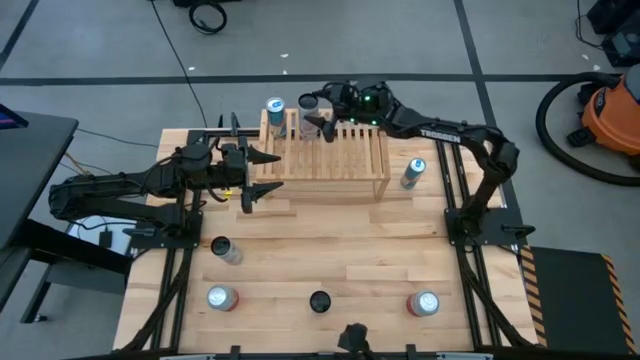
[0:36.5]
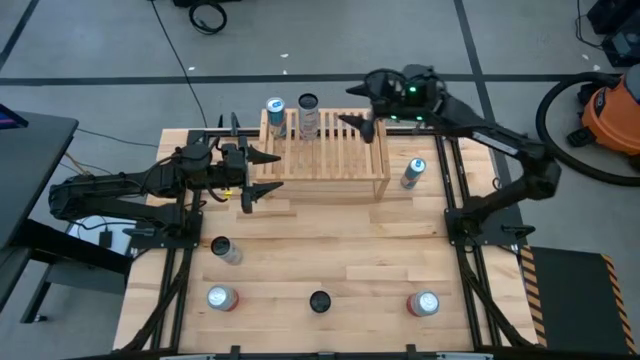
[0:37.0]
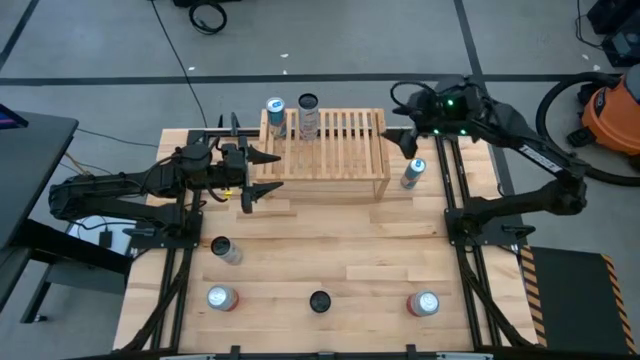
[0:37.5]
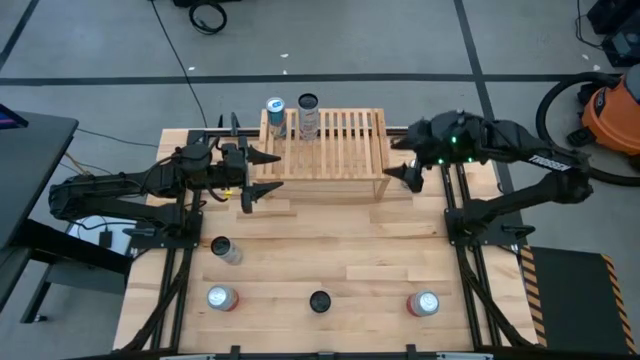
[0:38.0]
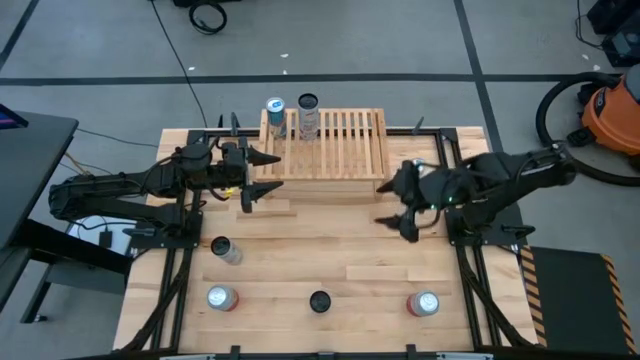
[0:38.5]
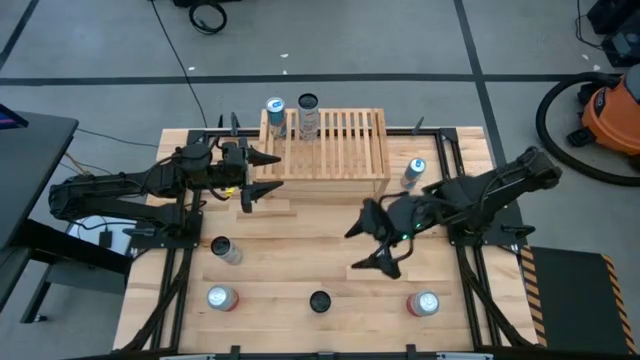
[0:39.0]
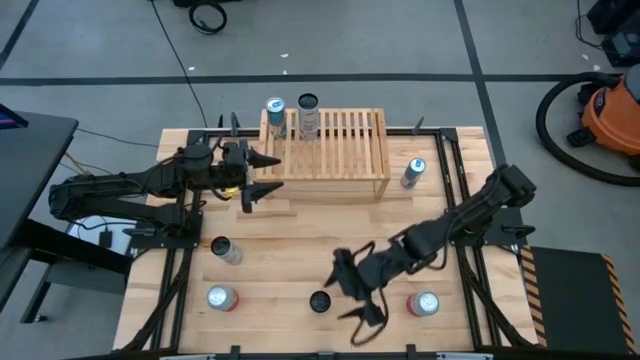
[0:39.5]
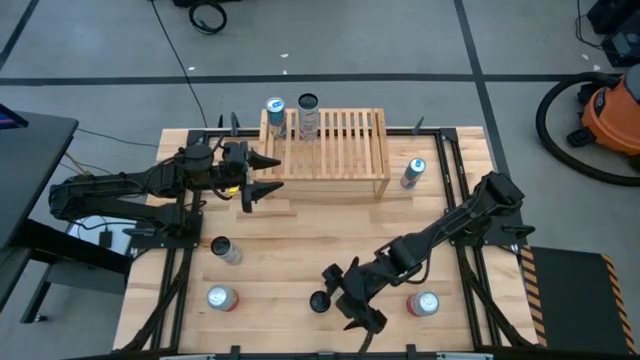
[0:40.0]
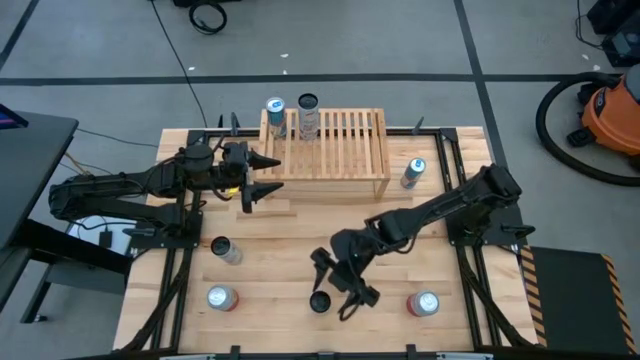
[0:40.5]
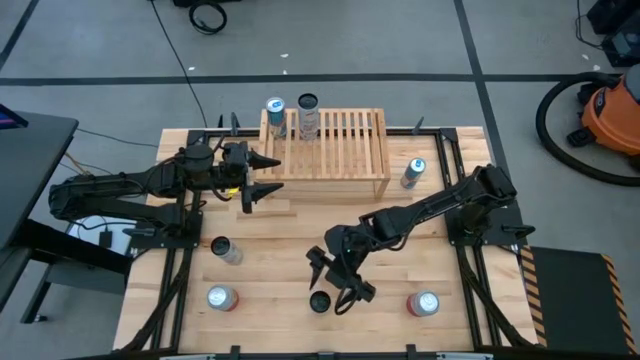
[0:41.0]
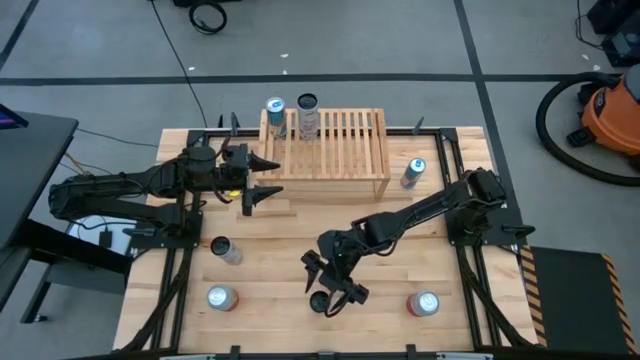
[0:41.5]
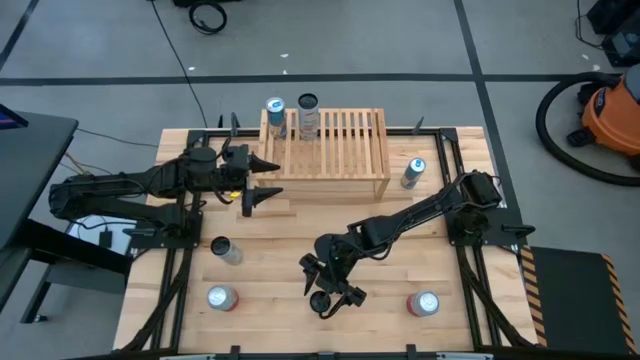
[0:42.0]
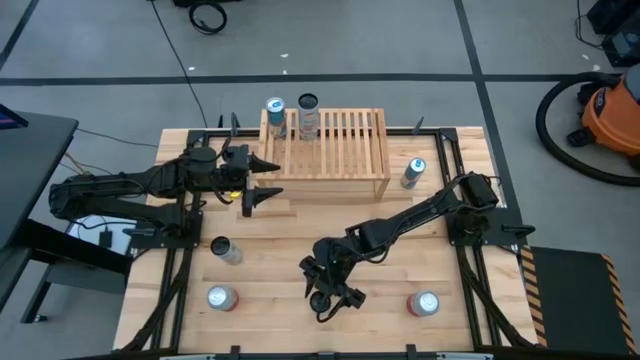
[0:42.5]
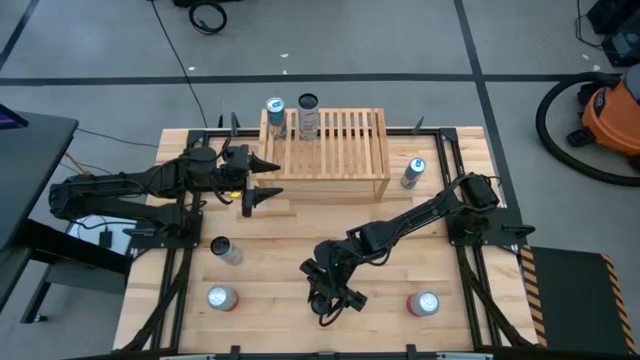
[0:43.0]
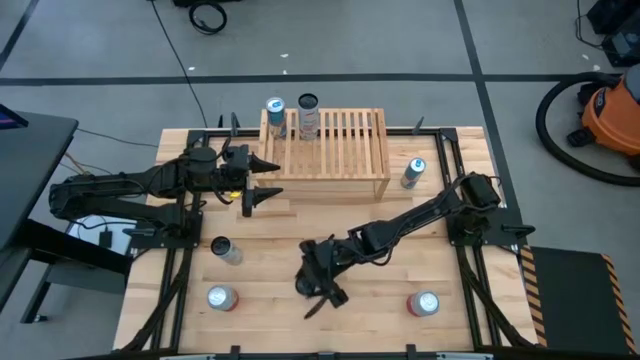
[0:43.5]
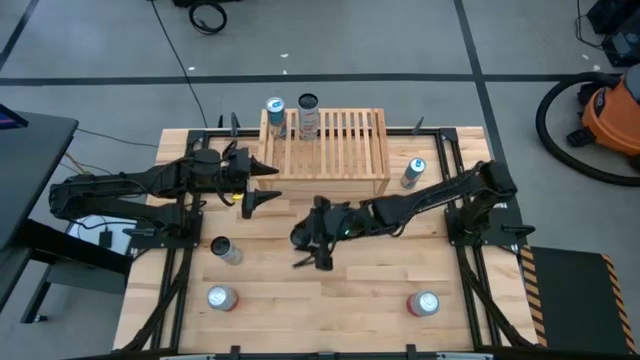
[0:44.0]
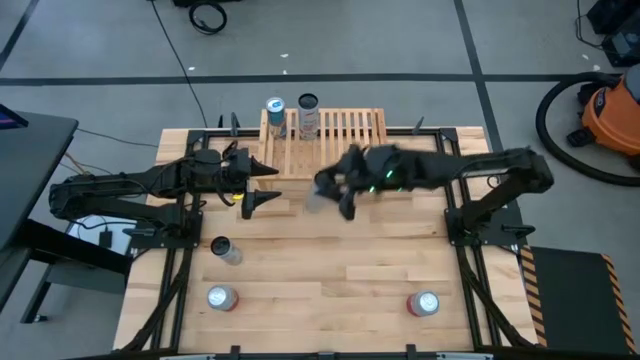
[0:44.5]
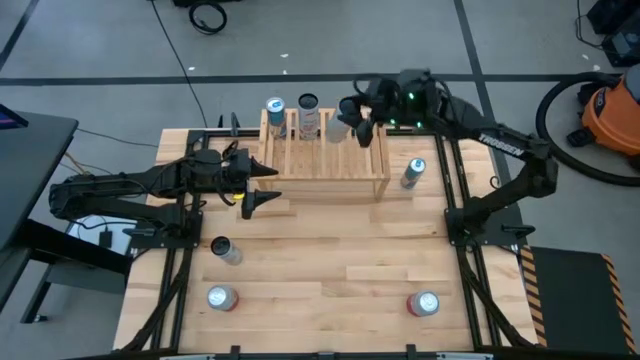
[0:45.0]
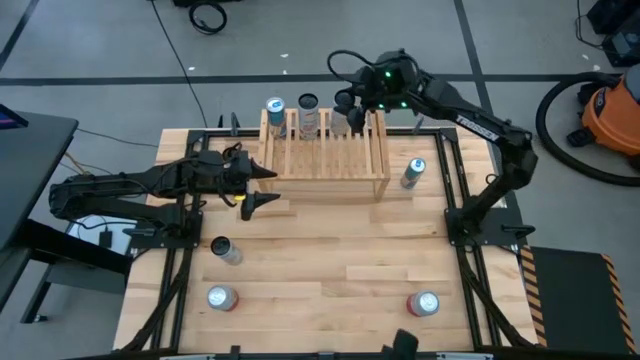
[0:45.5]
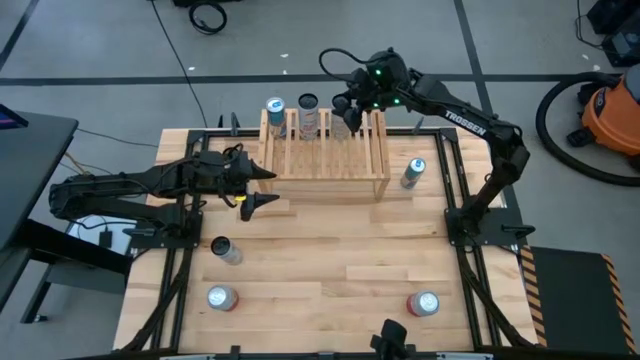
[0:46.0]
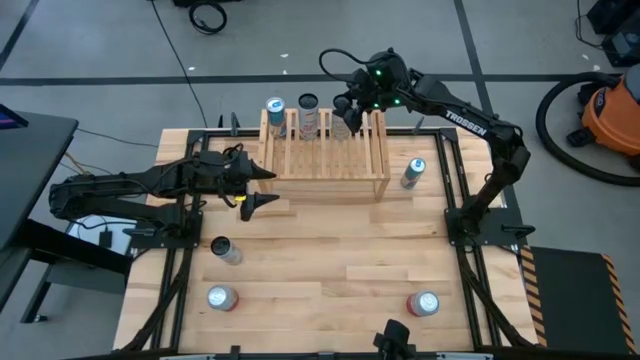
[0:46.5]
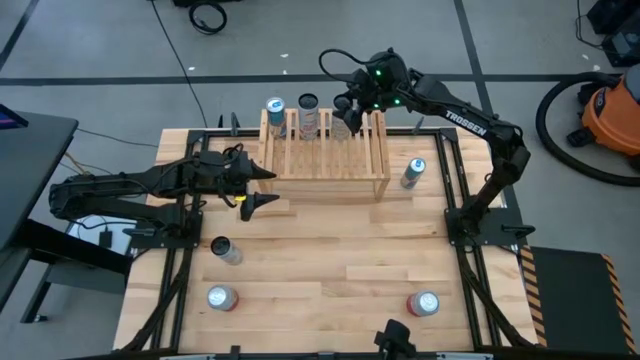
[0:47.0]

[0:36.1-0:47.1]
Task: Place canned beverage on shelf
Put the bottom white yellow soda can on the shelf

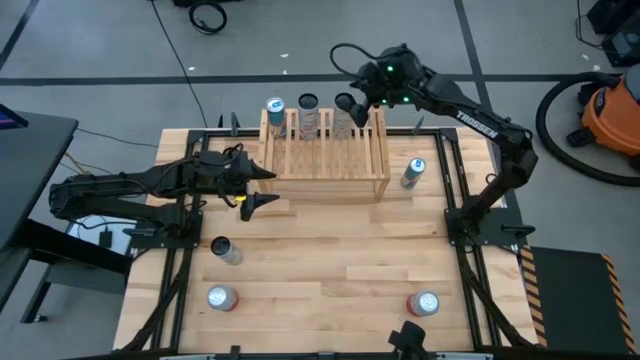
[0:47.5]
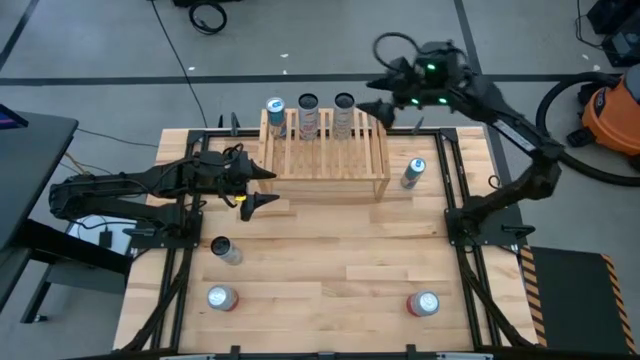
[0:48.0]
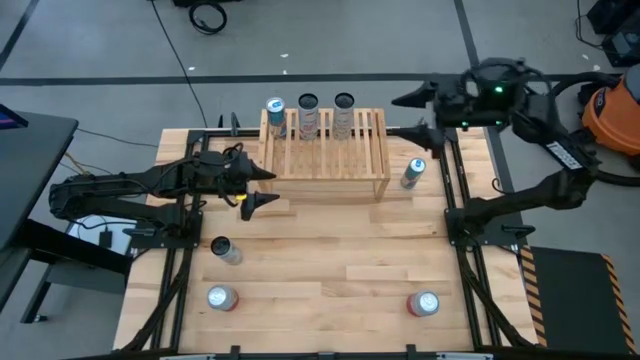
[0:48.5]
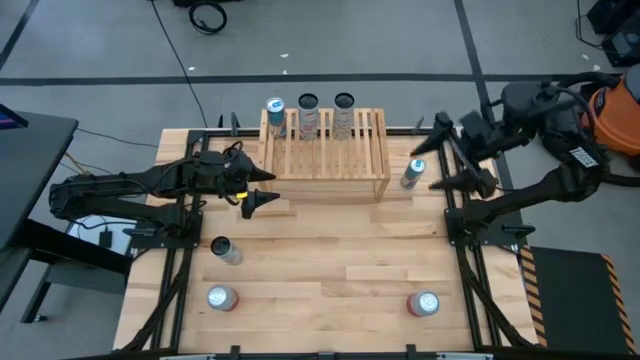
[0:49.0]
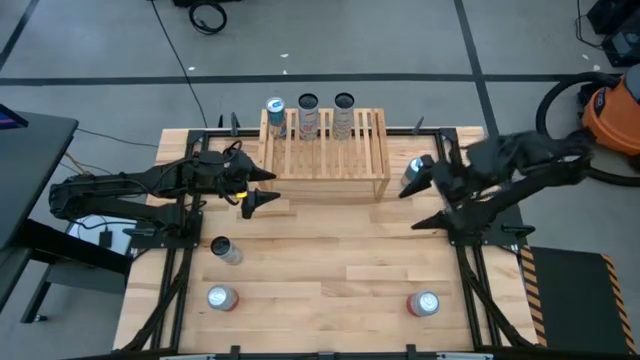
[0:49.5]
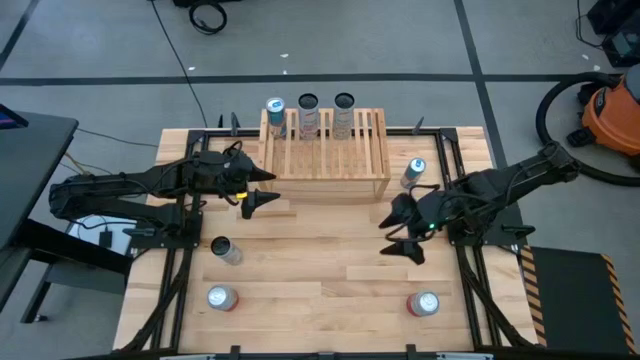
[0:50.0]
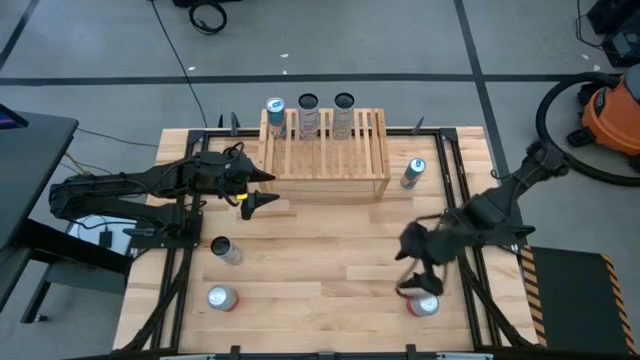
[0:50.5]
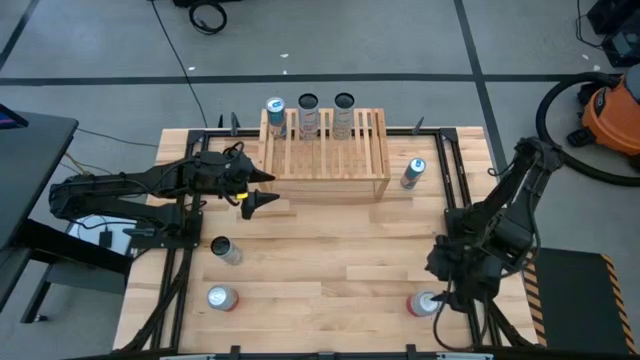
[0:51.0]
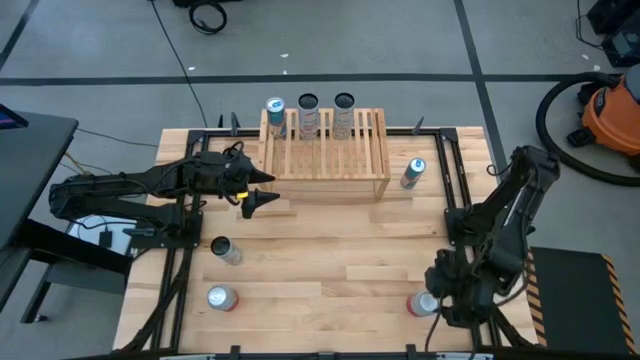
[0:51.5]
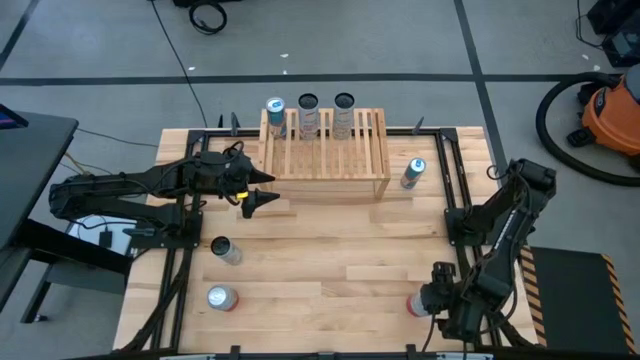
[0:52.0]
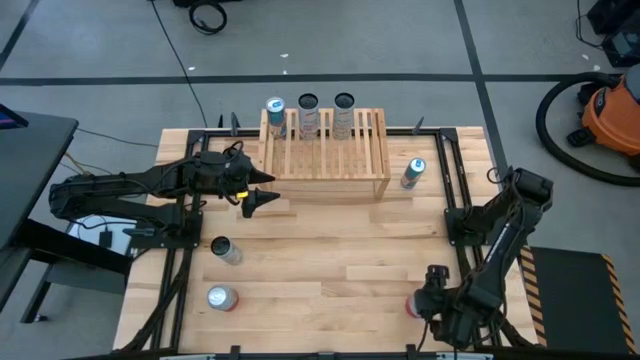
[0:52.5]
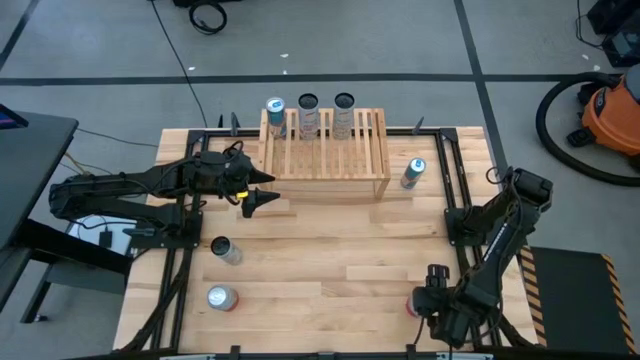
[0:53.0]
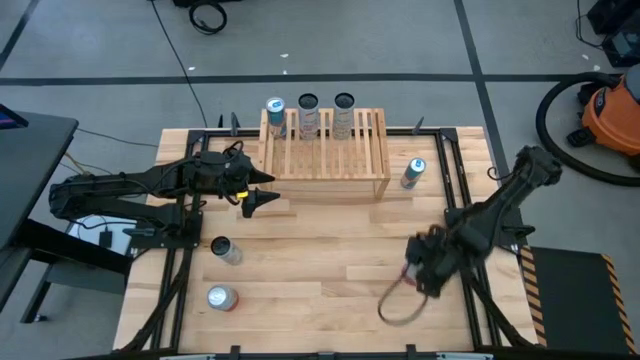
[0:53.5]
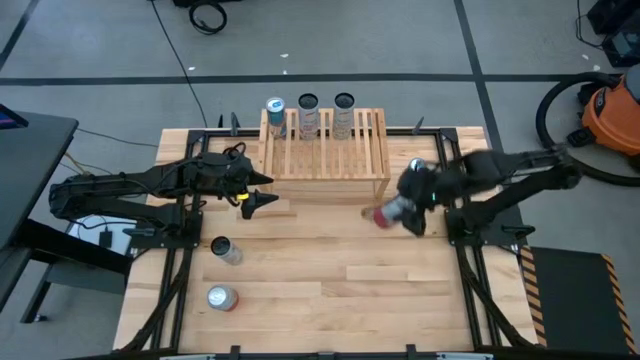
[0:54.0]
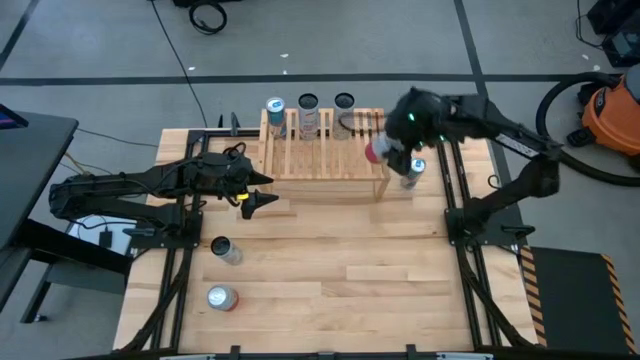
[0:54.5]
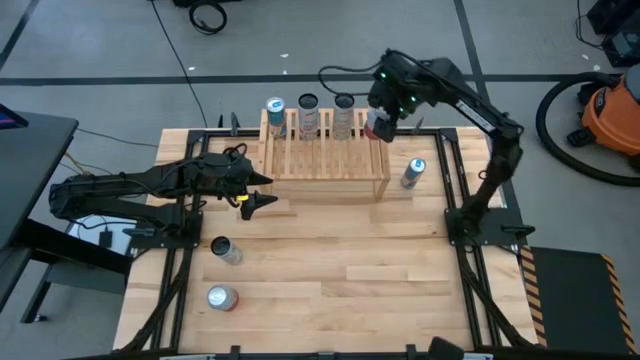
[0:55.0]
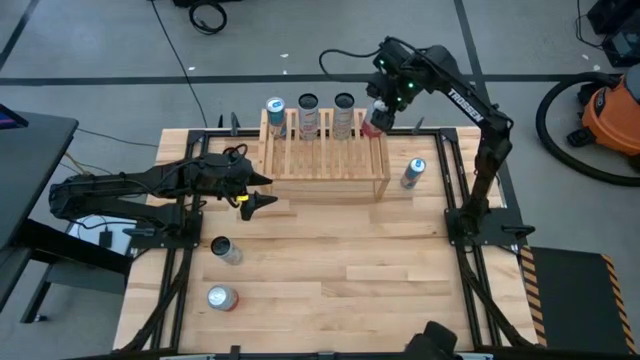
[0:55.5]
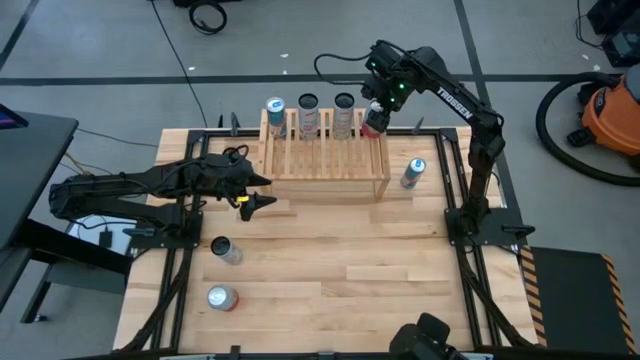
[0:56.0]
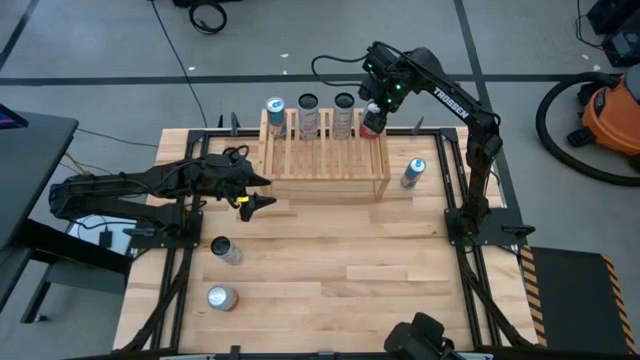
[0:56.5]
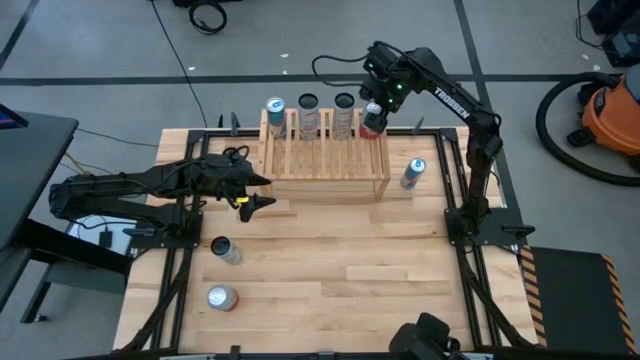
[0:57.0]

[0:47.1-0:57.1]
Put the right pink white soda can on the shelf
